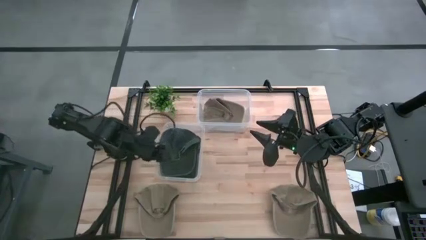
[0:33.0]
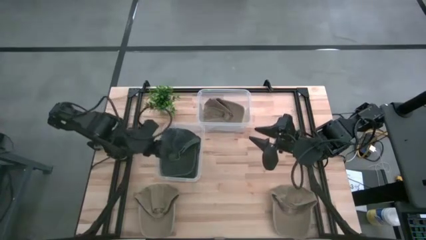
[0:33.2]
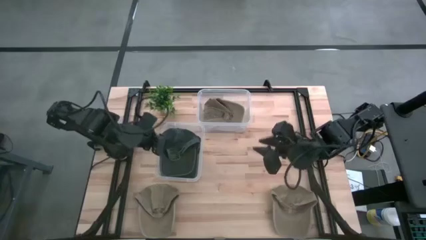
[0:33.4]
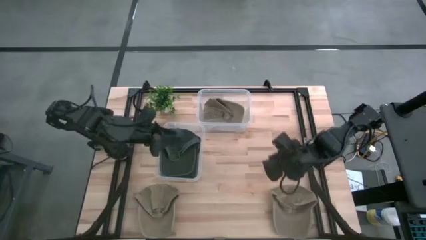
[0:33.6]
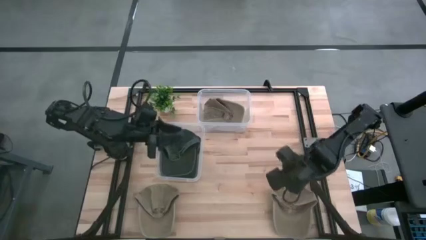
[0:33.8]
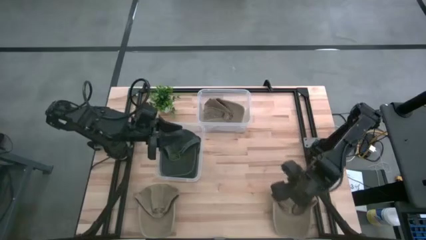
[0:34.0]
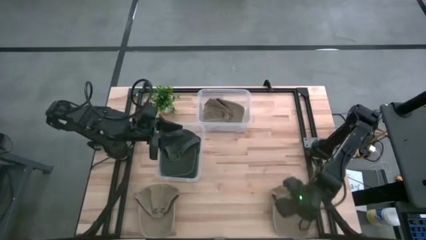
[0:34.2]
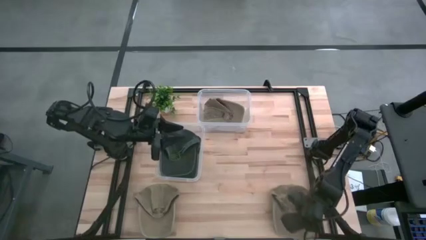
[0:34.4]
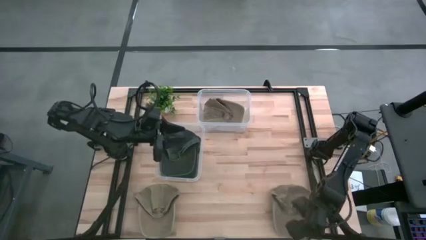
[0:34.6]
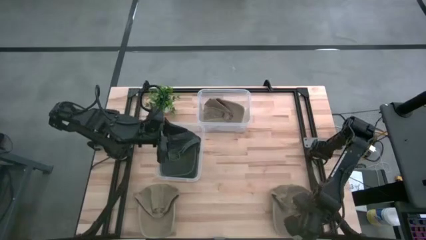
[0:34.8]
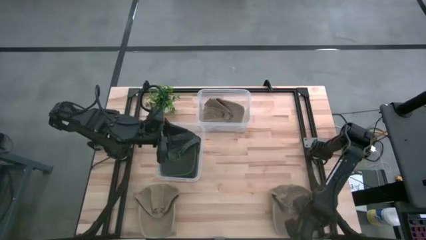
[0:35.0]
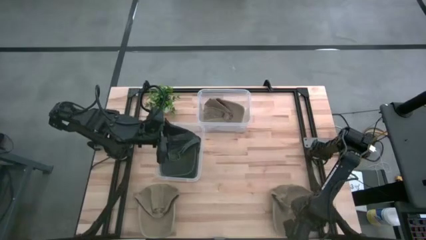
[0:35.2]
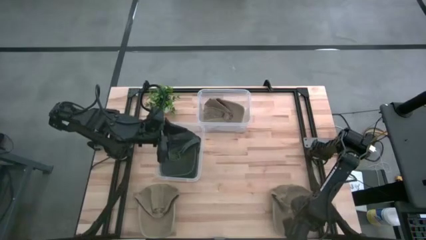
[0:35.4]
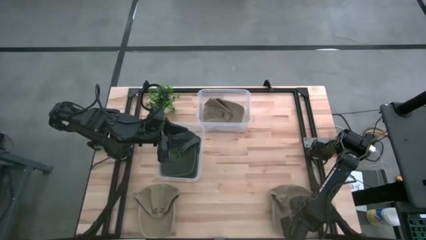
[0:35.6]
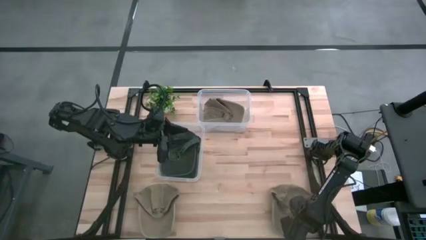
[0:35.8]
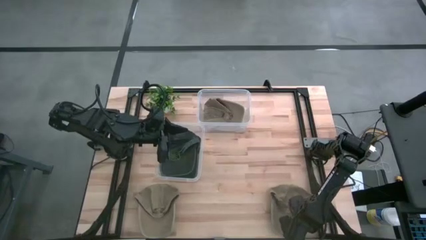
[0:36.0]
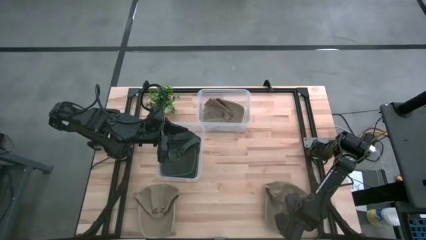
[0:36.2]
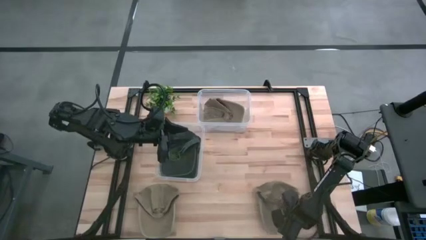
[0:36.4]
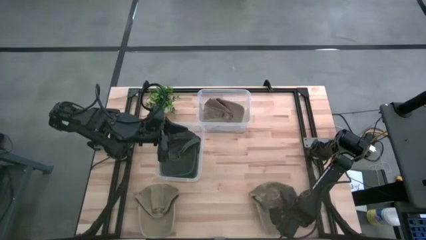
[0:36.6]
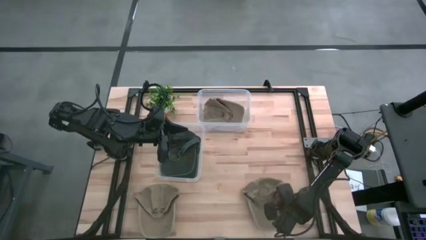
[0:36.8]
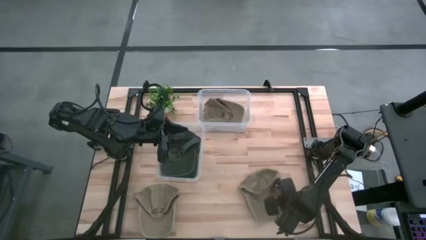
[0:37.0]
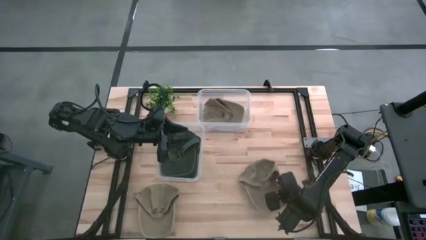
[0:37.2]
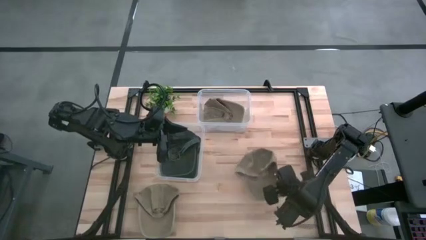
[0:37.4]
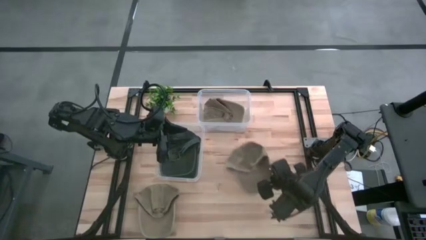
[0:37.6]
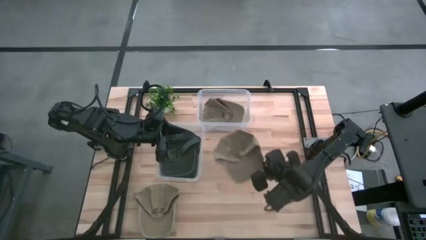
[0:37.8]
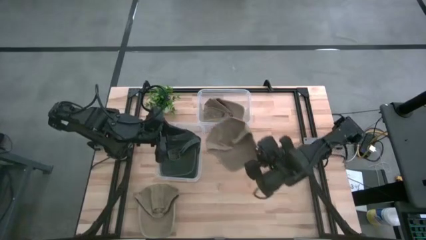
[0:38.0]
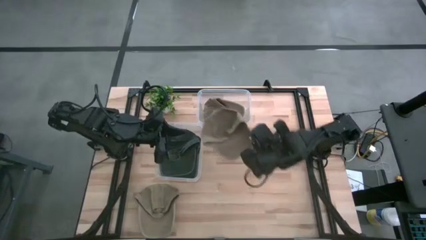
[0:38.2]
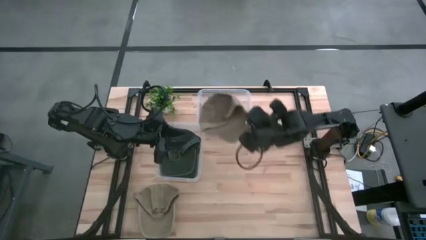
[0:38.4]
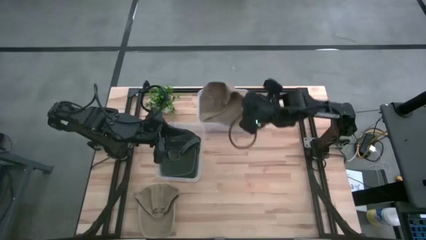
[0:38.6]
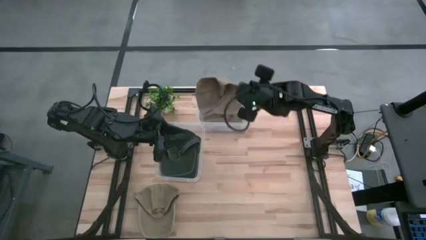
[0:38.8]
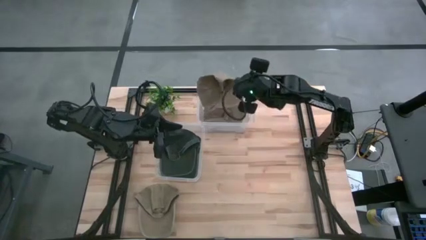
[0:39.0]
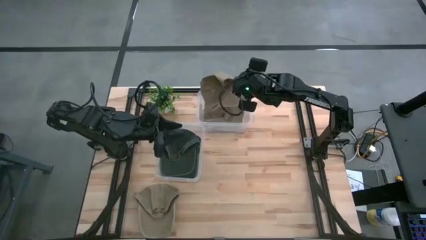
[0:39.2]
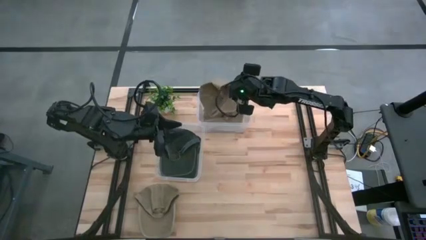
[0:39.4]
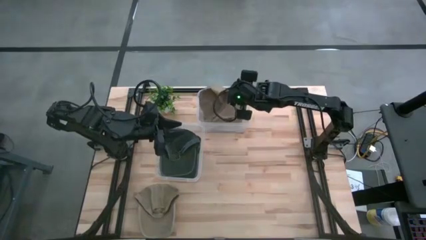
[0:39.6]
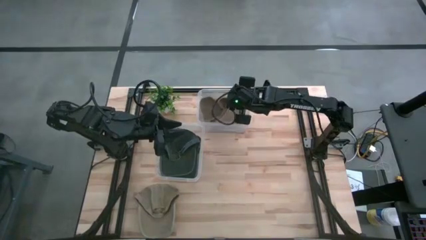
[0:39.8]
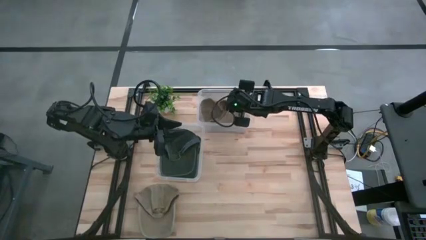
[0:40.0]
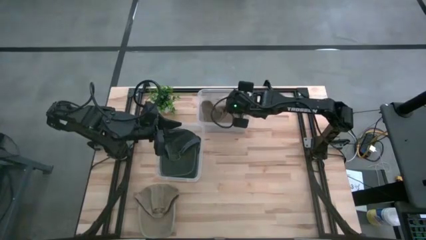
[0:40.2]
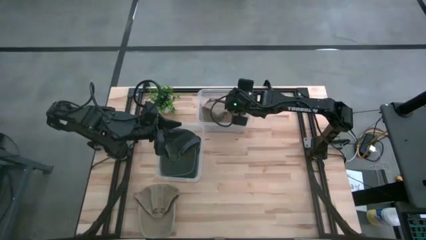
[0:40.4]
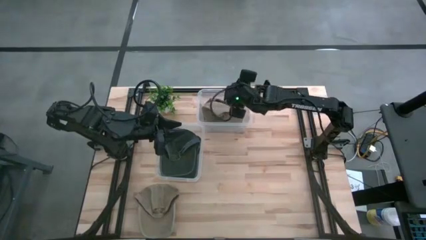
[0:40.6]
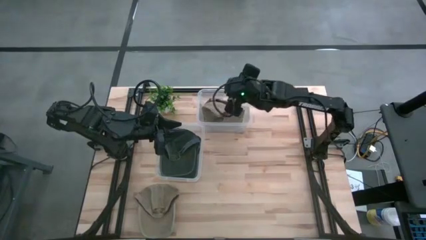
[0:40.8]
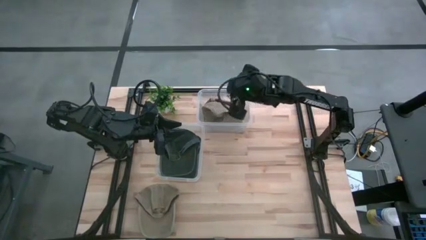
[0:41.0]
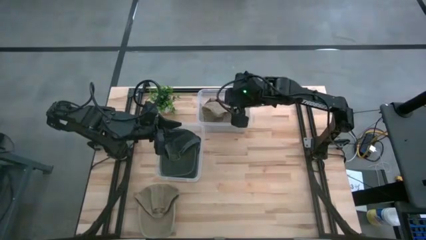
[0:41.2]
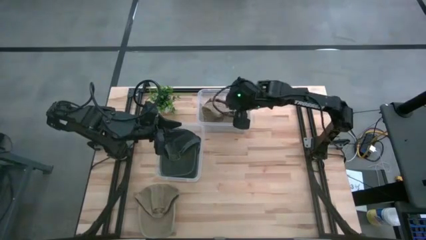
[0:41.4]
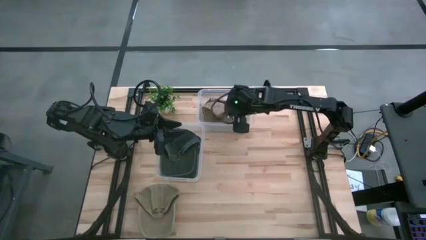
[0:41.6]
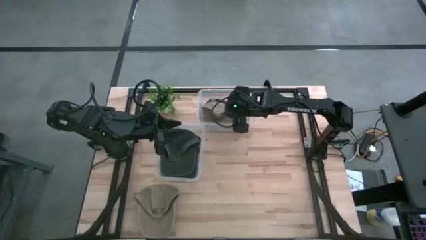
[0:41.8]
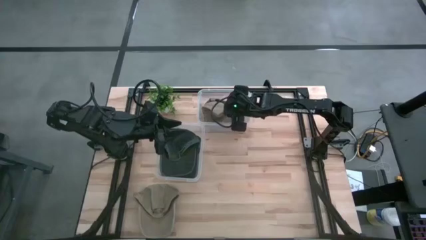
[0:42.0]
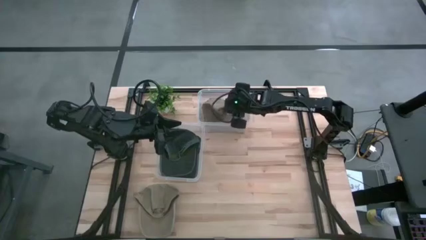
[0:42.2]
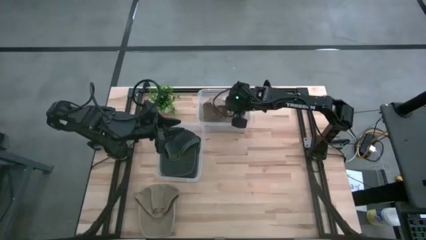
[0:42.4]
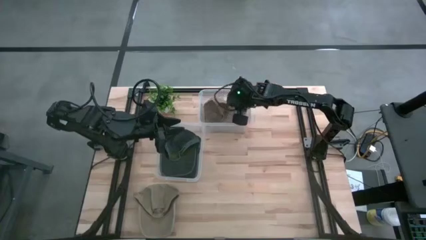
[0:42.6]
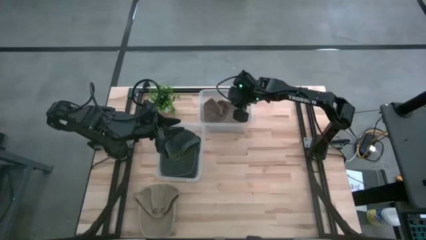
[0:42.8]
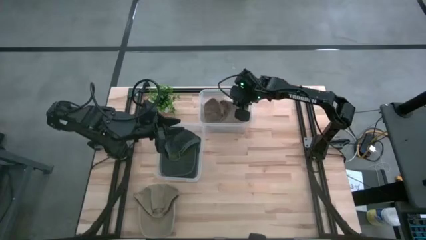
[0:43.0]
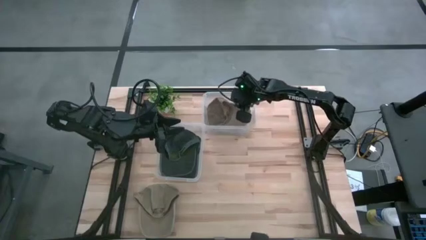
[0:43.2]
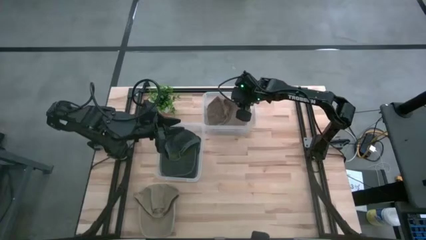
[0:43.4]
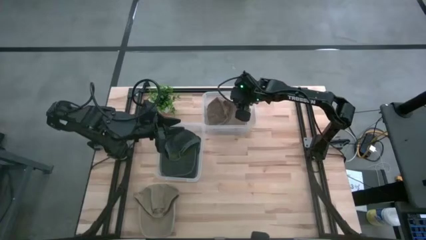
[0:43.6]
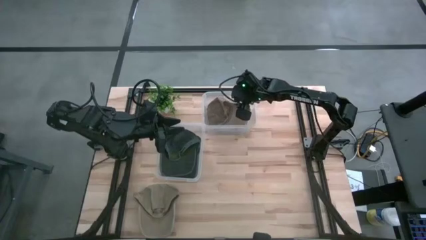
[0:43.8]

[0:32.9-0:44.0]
Task: Pick & Place hat
Put the right brown cap into the top transparent bin
